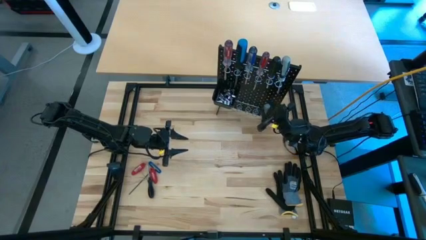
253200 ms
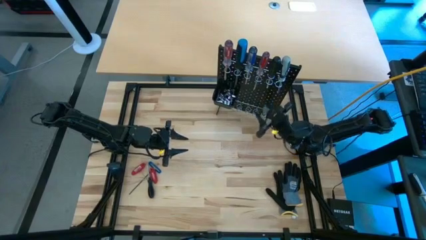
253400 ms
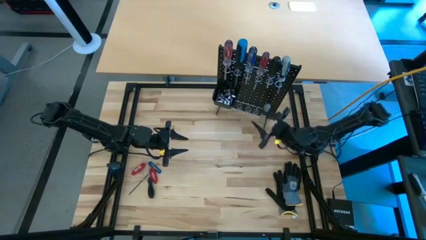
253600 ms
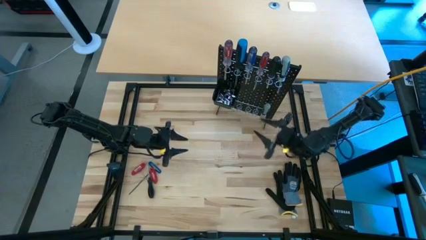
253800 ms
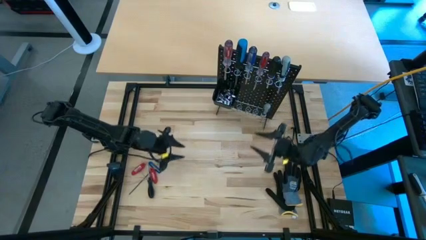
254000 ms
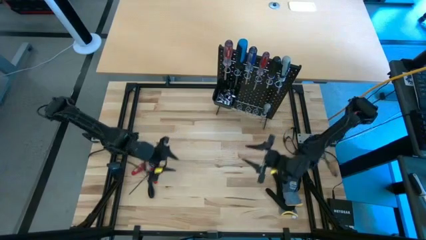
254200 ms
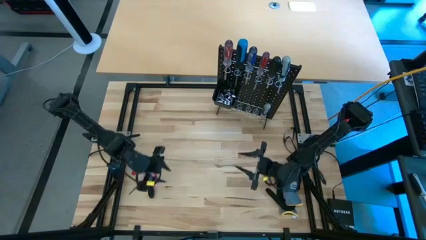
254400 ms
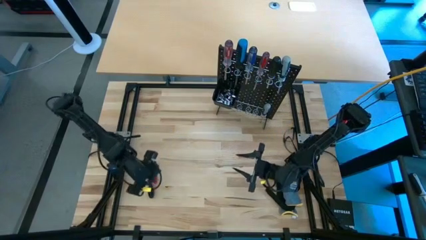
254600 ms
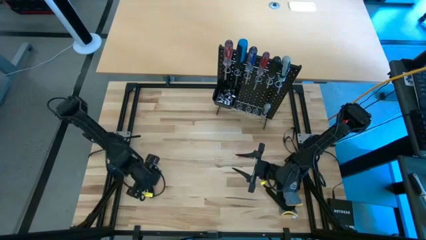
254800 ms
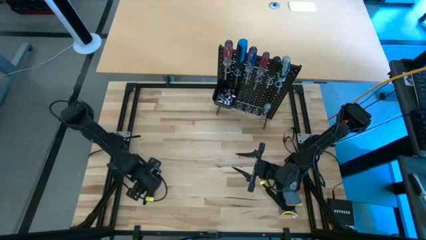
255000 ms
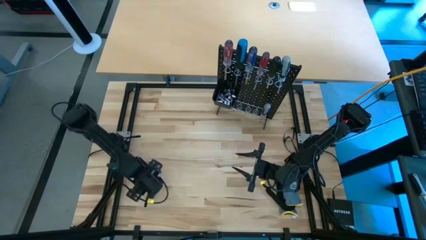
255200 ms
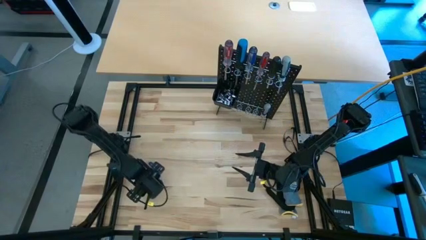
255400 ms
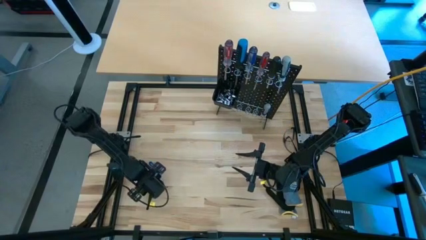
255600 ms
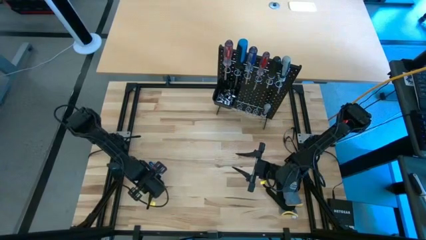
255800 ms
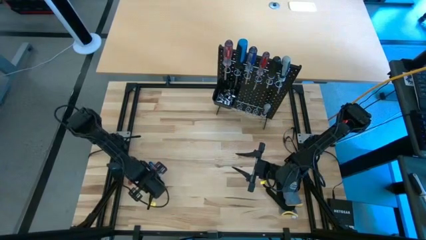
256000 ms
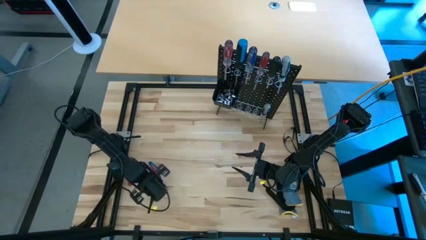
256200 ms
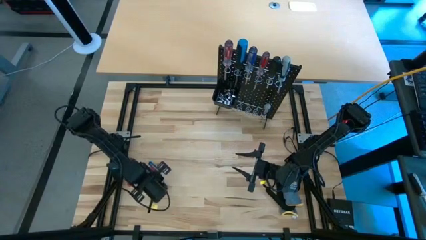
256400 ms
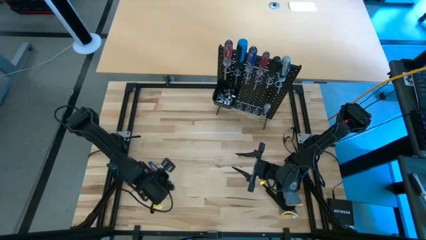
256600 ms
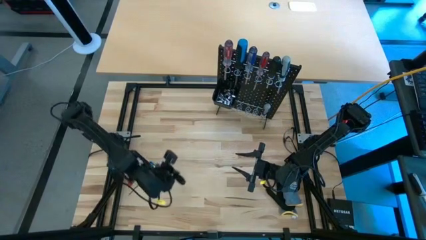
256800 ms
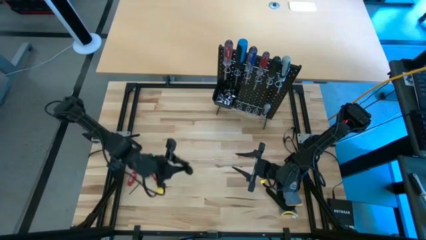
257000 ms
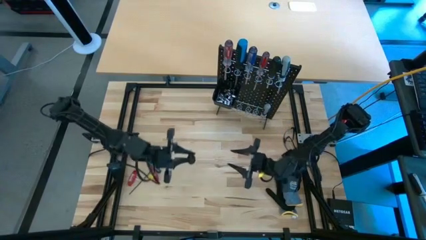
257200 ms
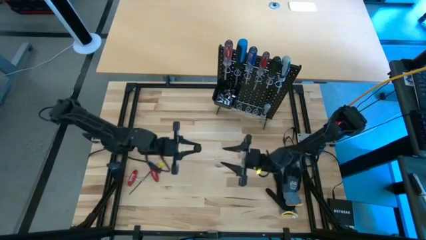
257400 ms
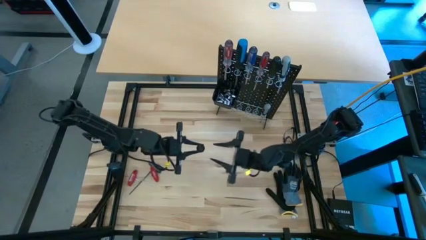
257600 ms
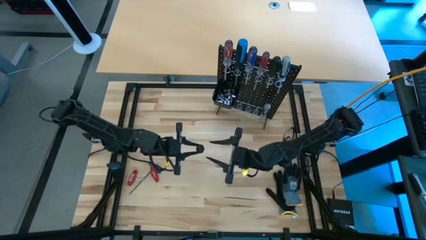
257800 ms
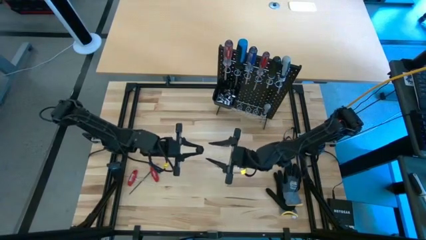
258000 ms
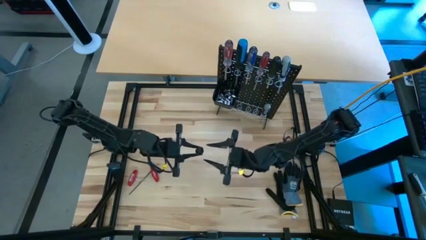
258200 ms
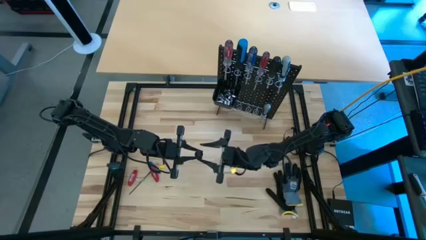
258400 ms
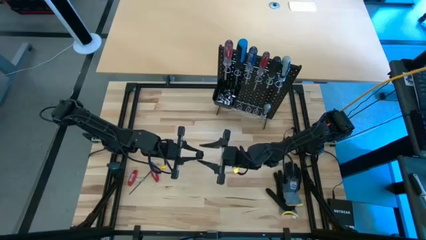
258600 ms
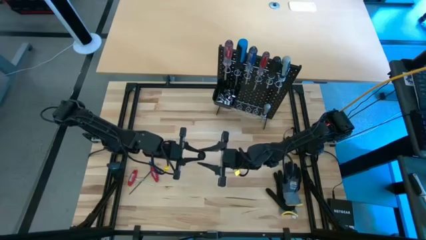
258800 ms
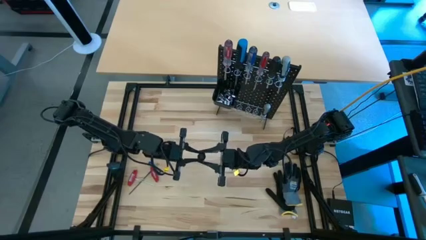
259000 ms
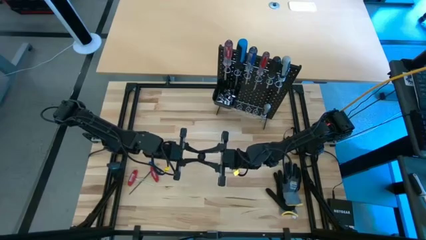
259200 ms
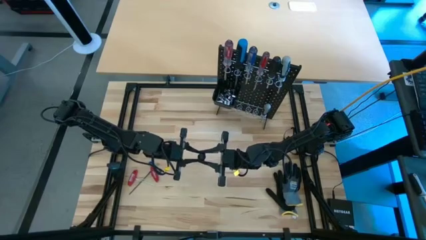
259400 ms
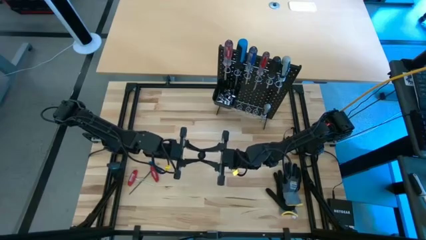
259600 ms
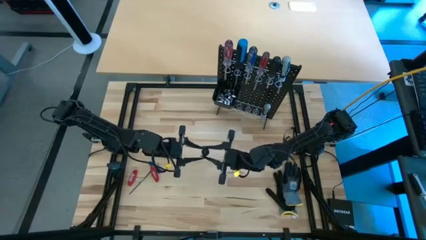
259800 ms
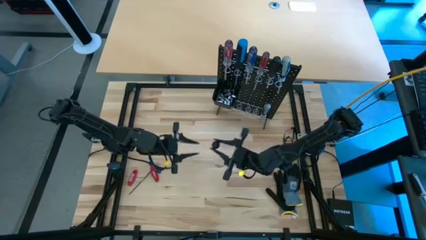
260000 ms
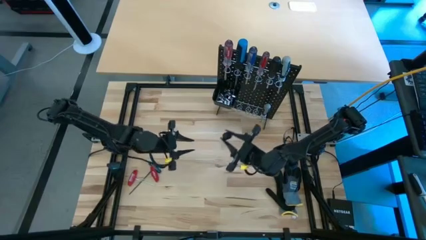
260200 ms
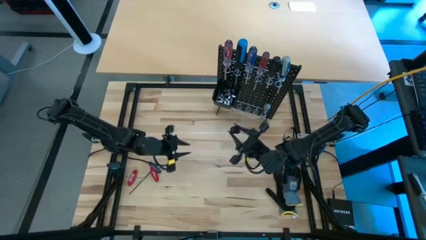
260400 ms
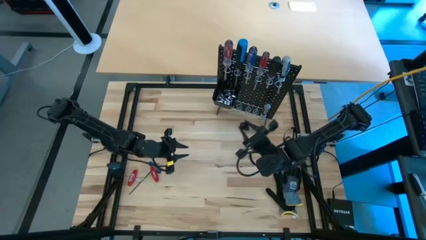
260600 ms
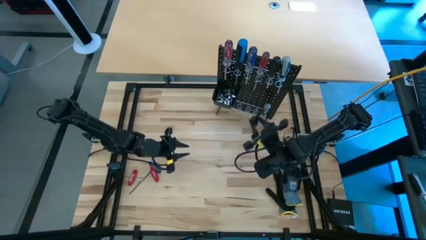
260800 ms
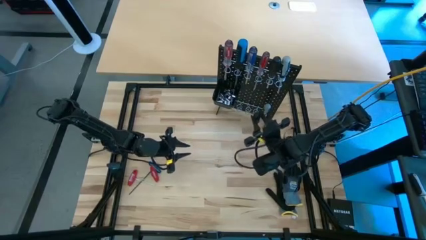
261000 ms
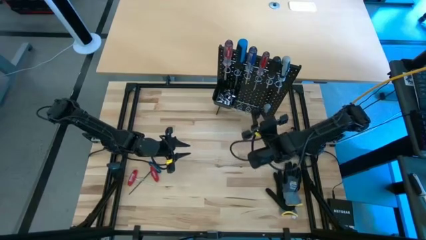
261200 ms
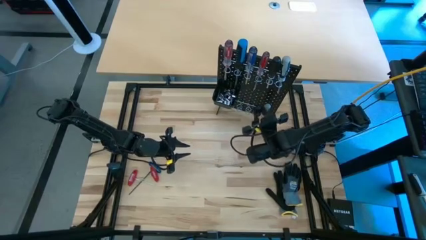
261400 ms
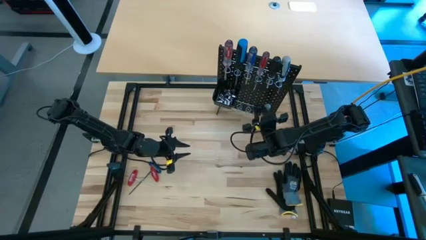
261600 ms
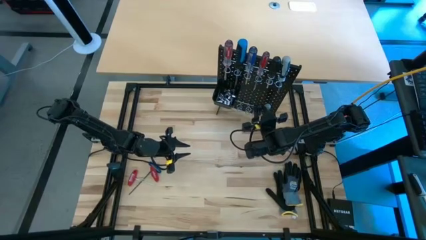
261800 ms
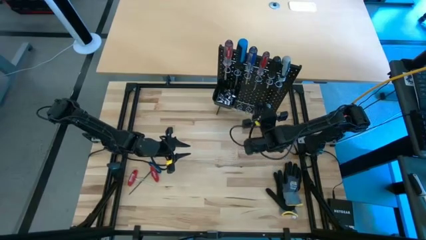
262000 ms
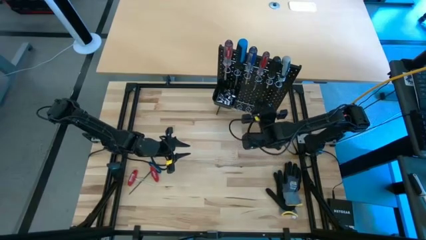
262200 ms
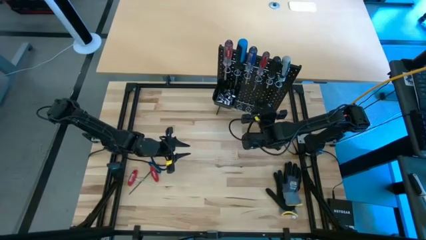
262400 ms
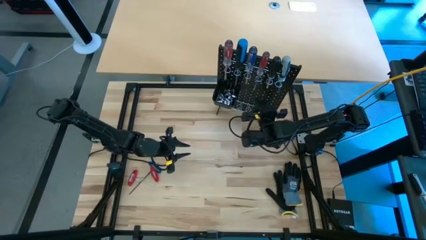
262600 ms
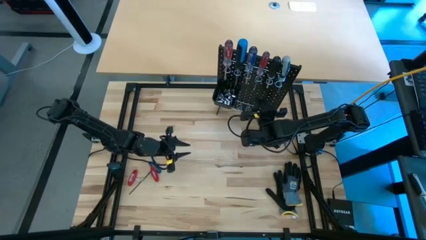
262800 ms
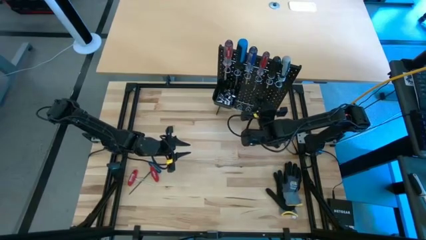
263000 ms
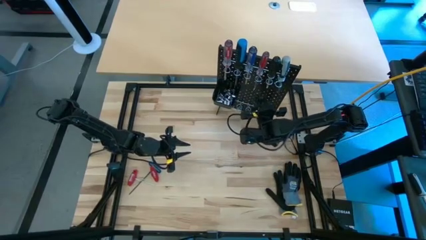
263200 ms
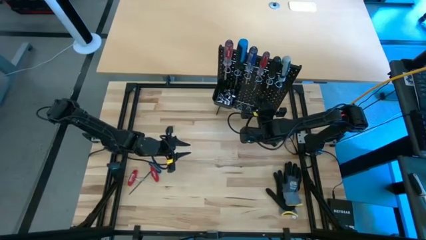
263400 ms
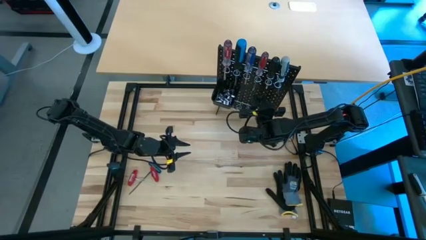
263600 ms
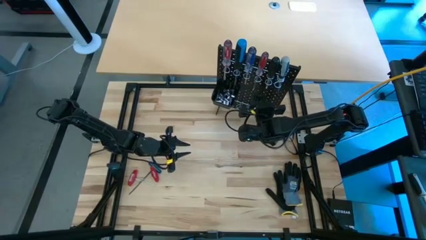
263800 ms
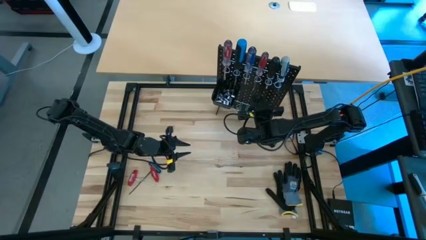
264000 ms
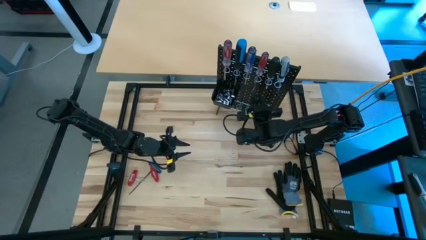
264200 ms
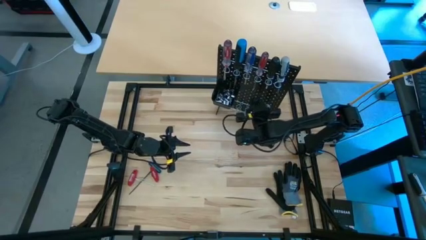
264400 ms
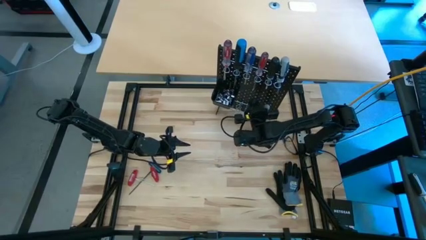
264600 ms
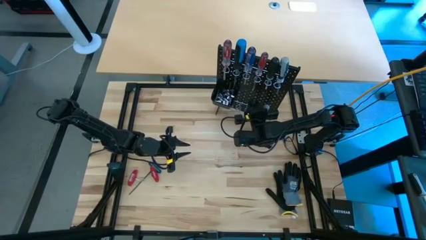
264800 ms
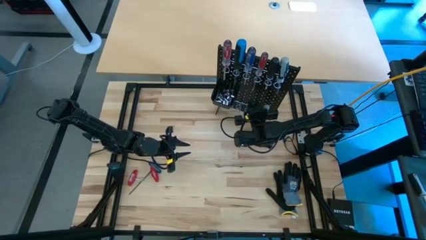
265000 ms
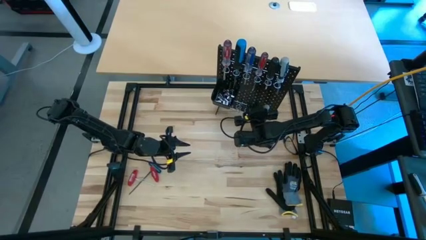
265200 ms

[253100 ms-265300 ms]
Task: Hang tools onto peg board
Hang the black screwdriver on the black pegboard
